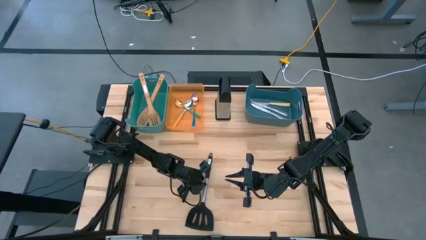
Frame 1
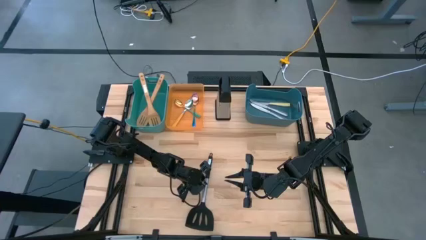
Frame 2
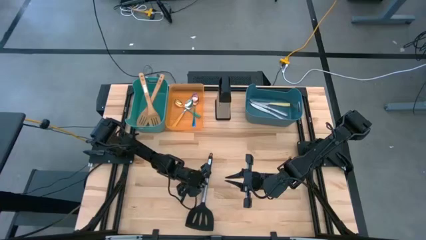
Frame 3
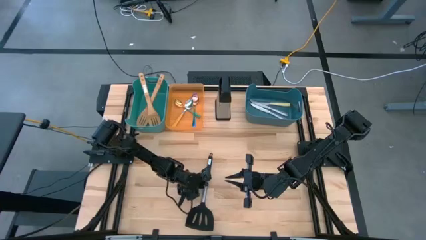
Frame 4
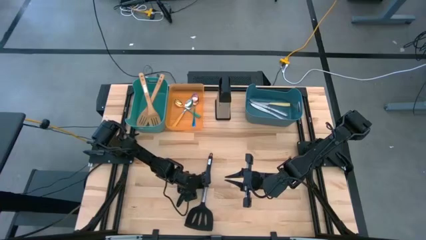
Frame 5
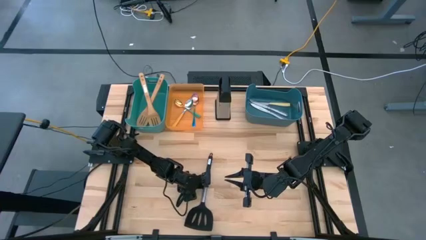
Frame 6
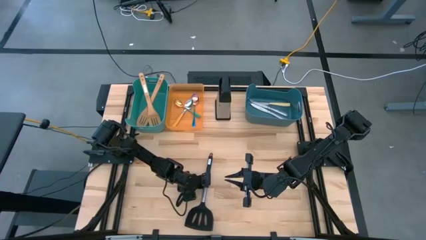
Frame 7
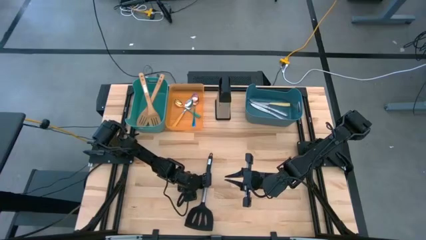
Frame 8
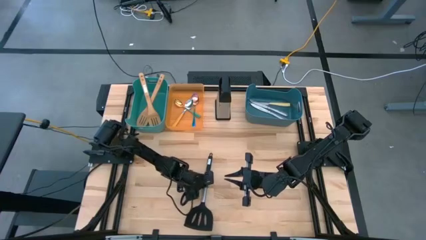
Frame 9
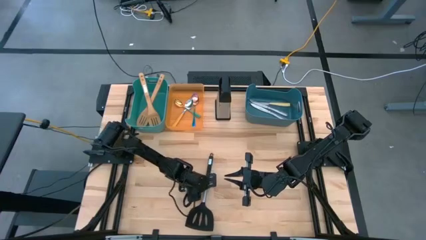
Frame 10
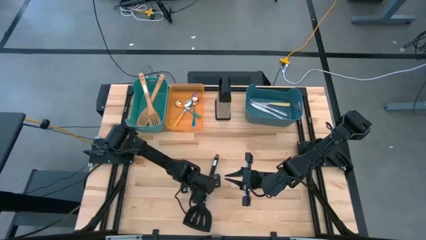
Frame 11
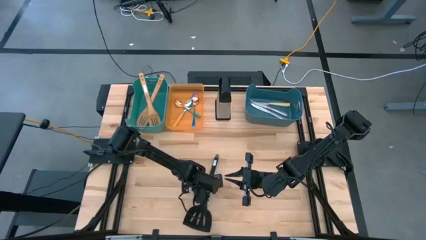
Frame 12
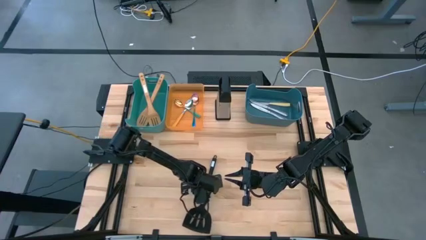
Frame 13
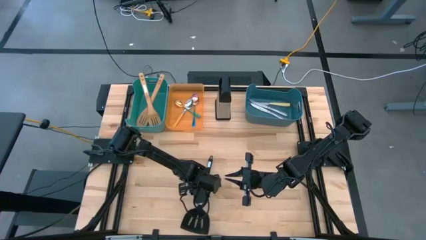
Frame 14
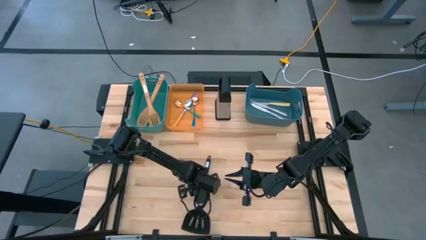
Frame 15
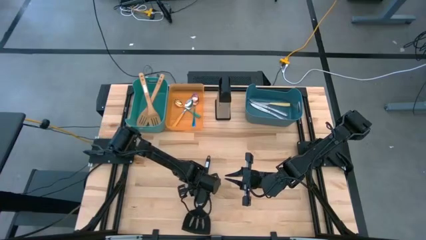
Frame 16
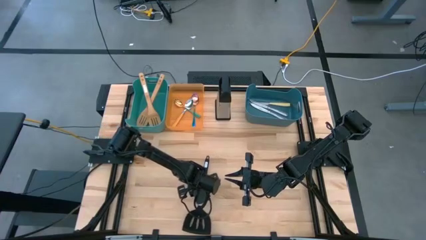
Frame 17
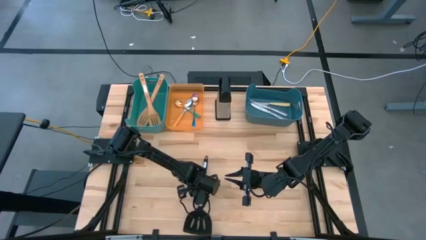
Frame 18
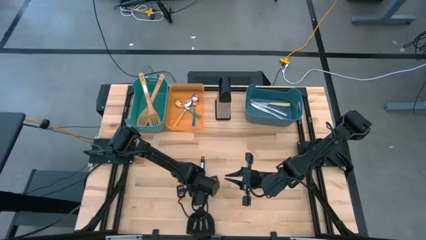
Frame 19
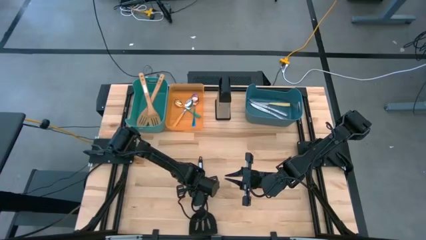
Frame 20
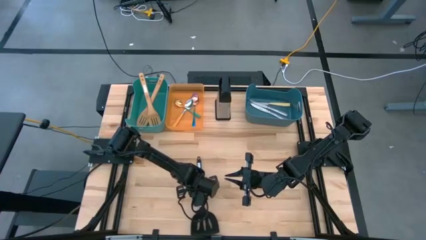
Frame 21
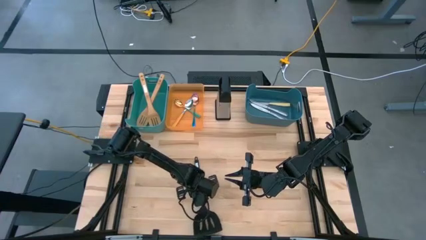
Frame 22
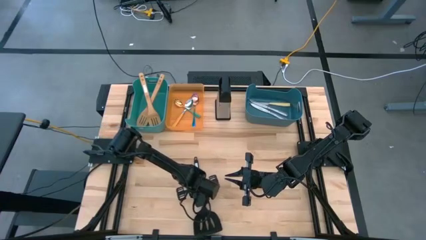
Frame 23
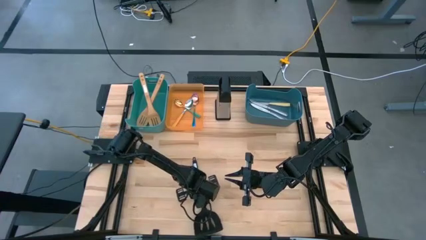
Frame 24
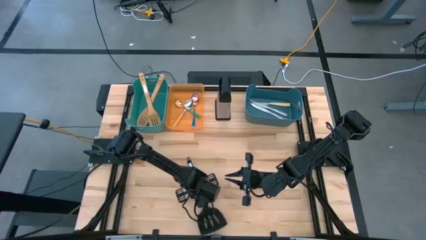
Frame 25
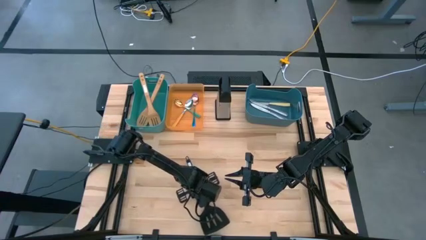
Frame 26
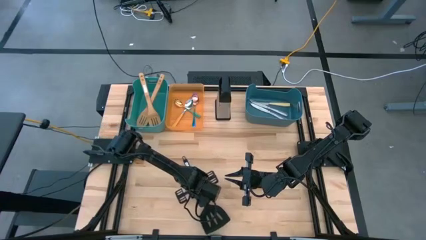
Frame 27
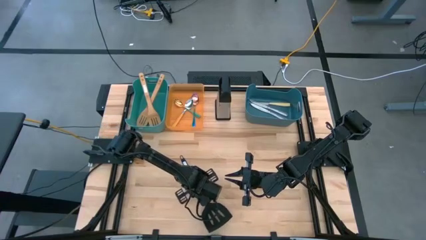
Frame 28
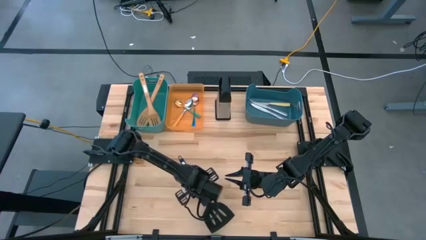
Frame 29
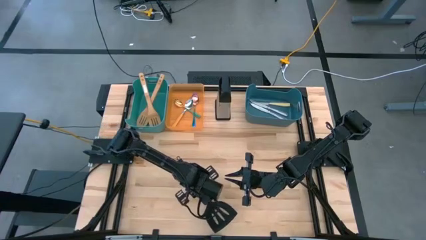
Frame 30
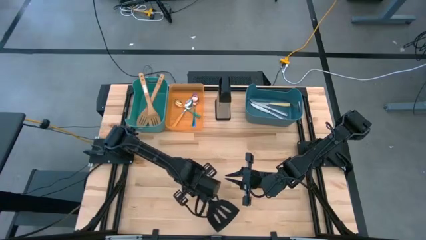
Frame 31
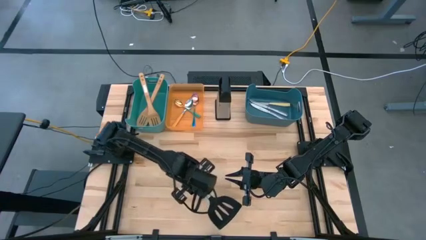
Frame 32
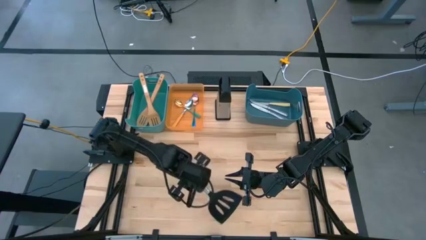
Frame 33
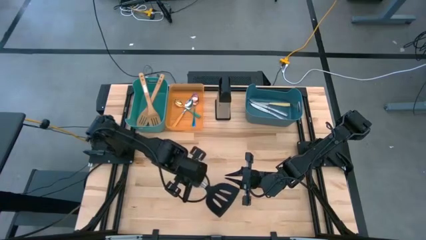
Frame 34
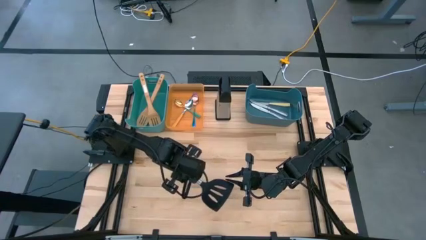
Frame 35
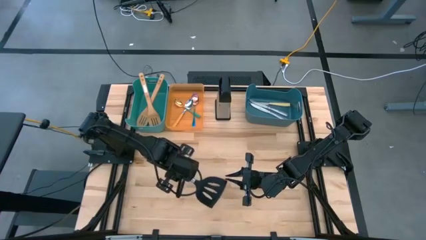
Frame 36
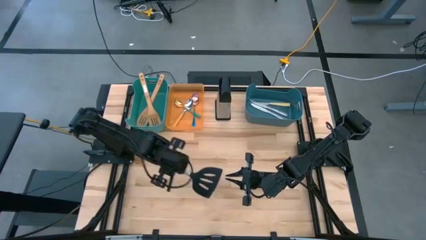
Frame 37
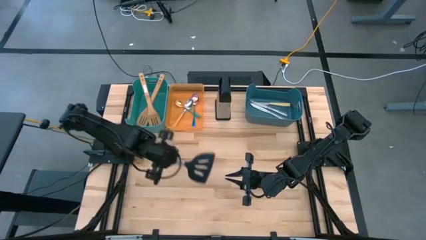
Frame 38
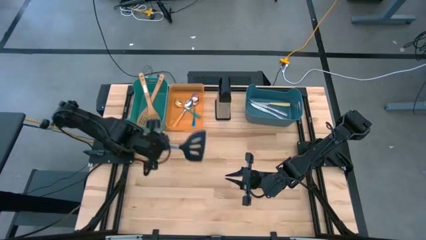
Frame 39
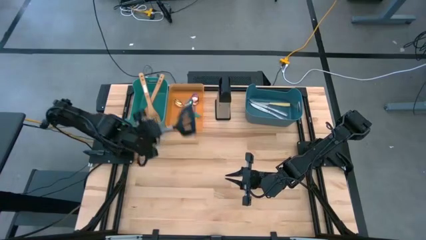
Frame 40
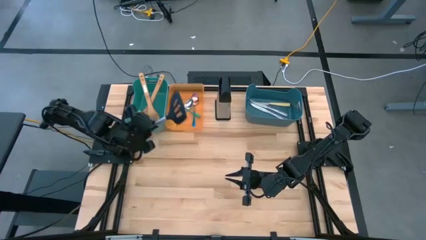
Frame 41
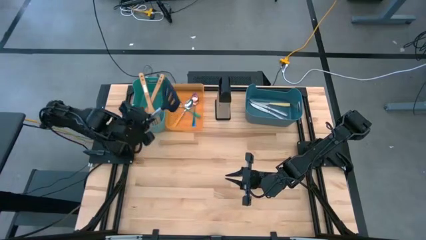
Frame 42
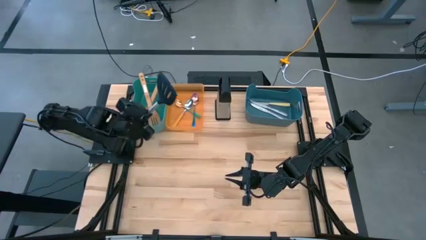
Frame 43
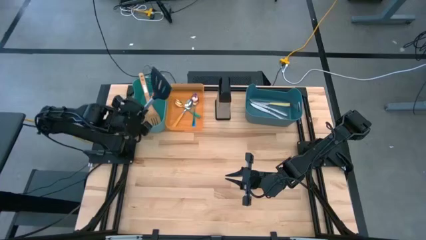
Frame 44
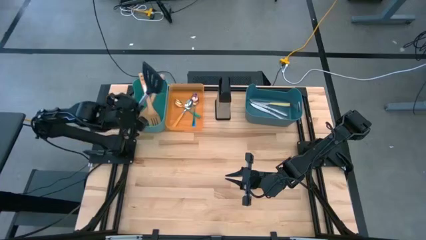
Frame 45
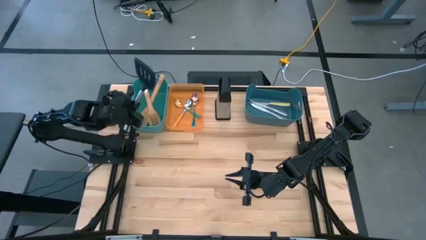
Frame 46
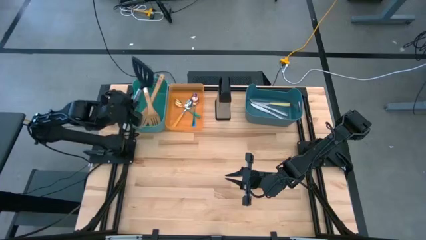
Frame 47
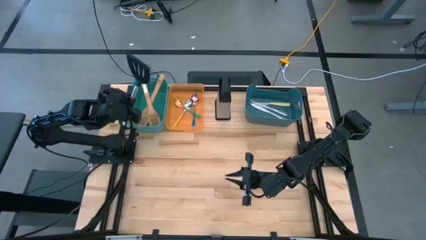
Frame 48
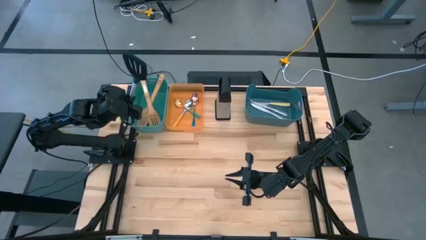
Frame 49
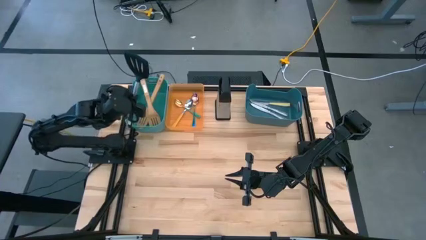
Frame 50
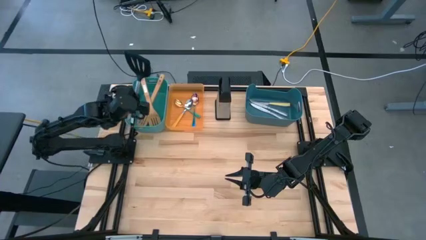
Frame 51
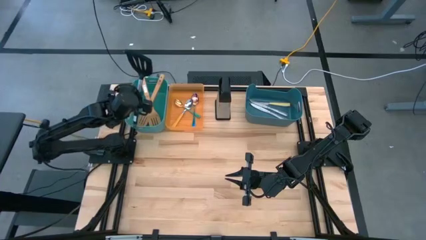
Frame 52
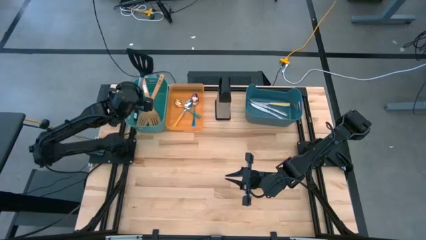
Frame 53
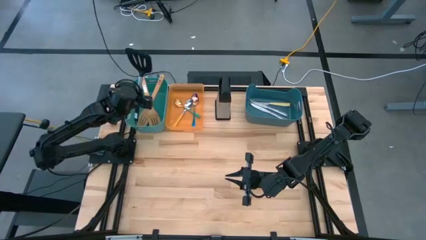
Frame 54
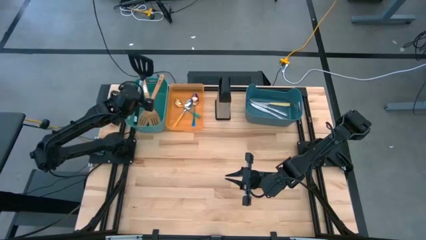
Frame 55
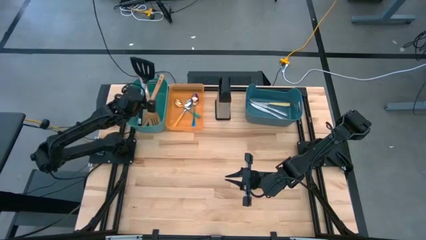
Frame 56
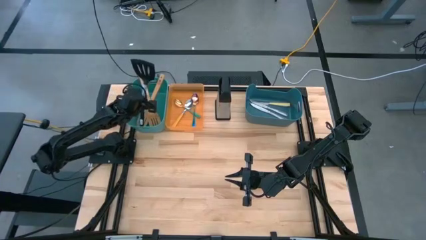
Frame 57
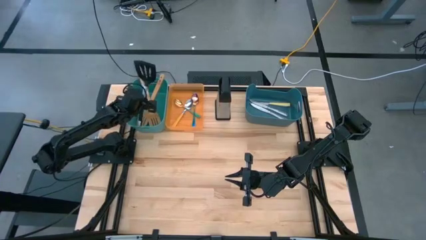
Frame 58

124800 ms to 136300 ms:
Task: Pick & Place Kitchen Items
Put the black spatula into the green bin

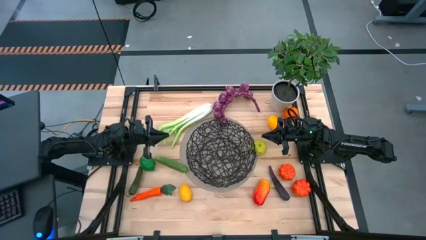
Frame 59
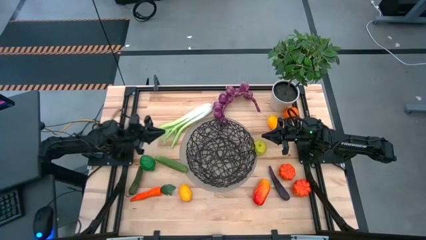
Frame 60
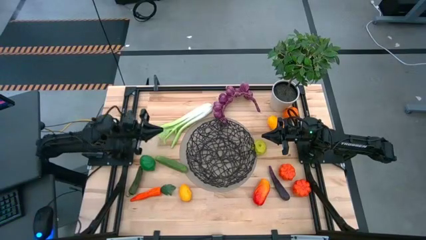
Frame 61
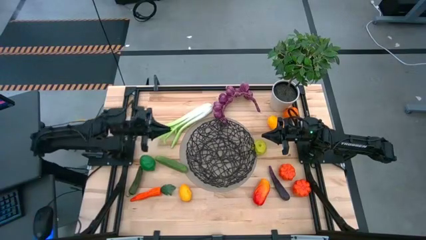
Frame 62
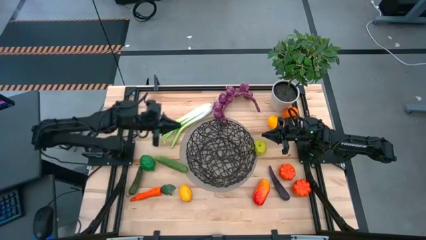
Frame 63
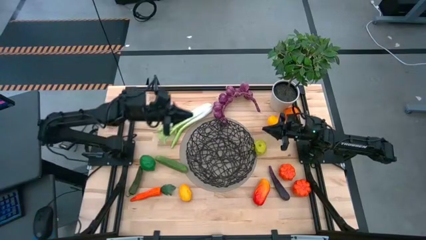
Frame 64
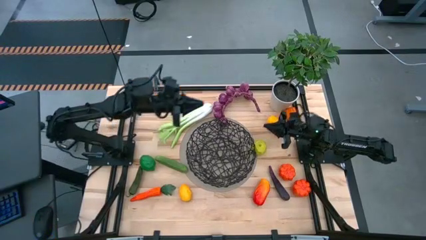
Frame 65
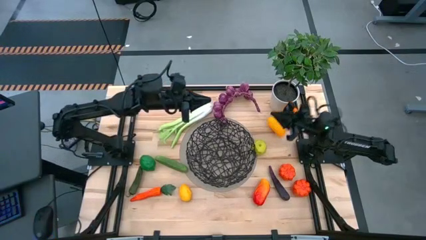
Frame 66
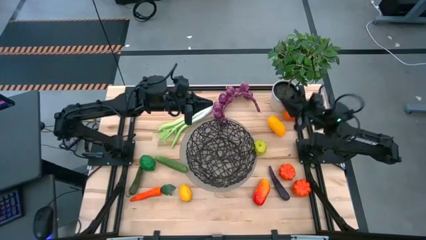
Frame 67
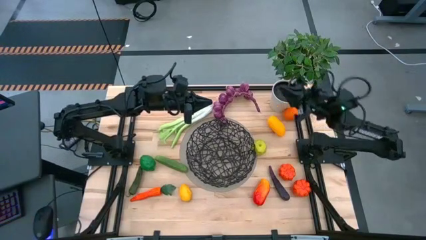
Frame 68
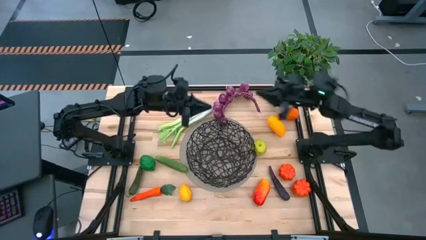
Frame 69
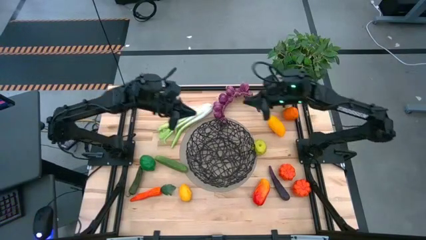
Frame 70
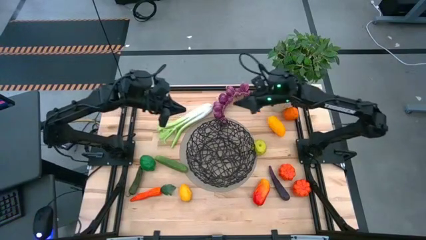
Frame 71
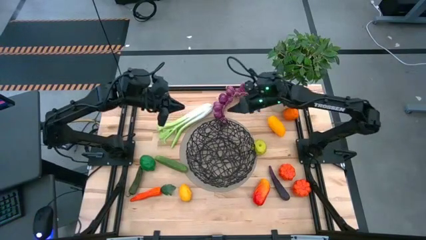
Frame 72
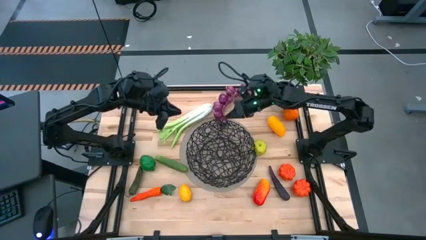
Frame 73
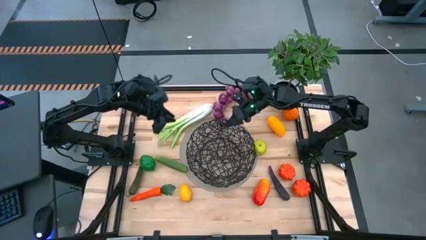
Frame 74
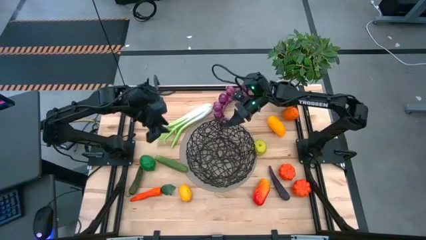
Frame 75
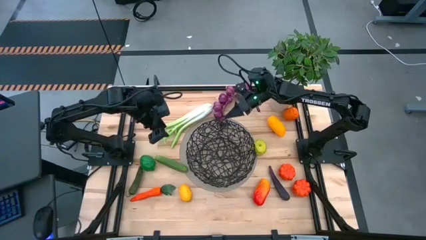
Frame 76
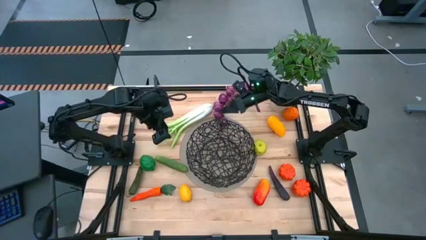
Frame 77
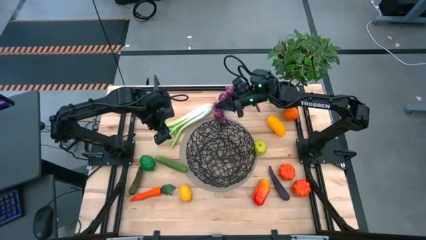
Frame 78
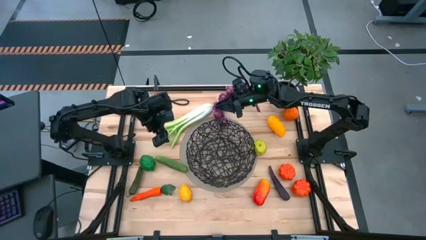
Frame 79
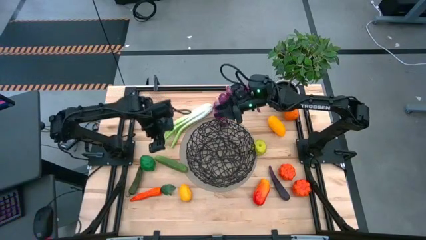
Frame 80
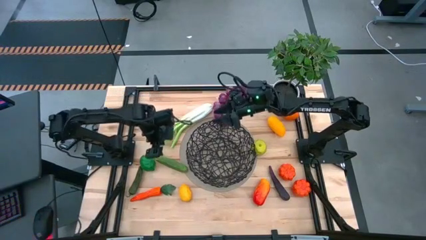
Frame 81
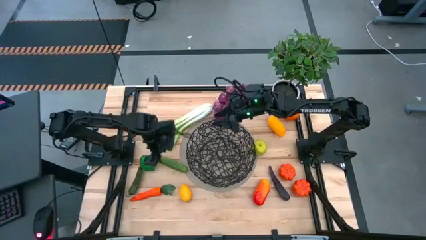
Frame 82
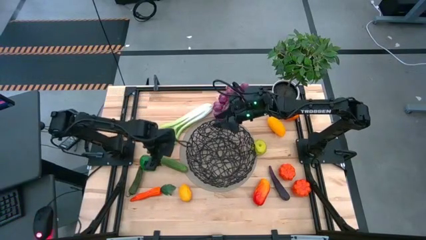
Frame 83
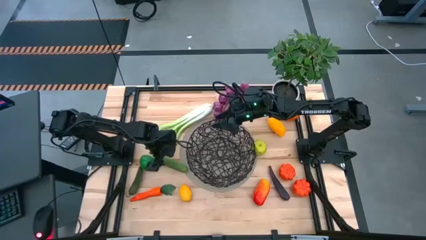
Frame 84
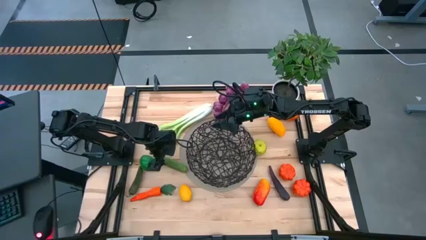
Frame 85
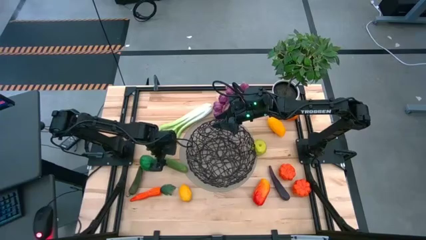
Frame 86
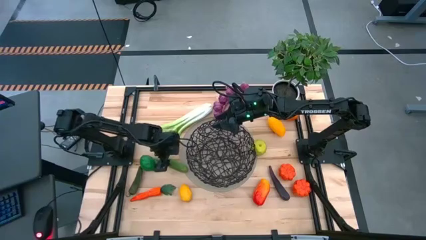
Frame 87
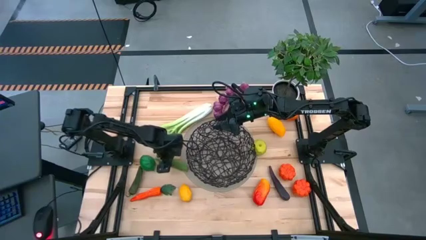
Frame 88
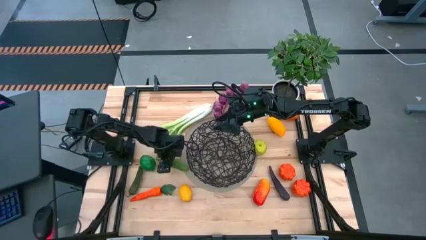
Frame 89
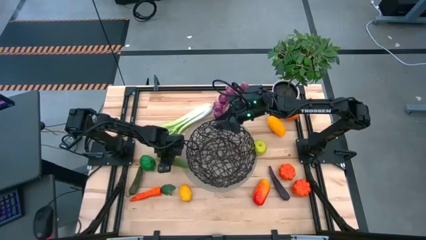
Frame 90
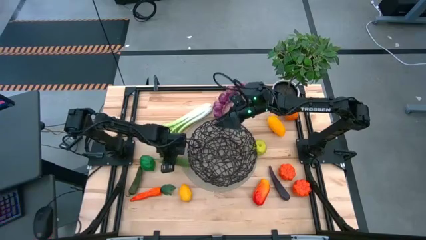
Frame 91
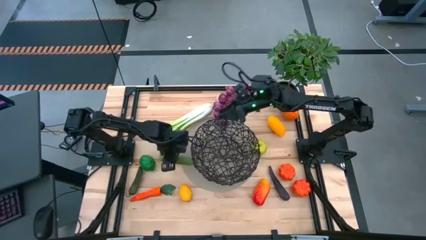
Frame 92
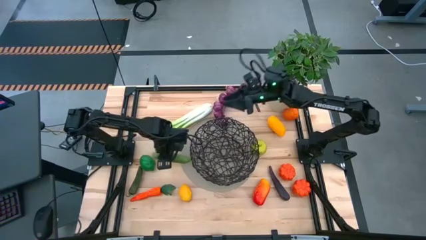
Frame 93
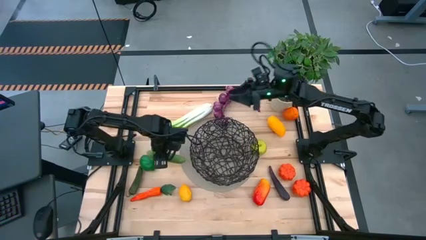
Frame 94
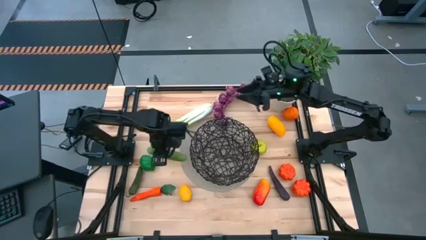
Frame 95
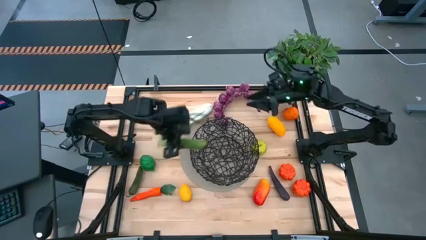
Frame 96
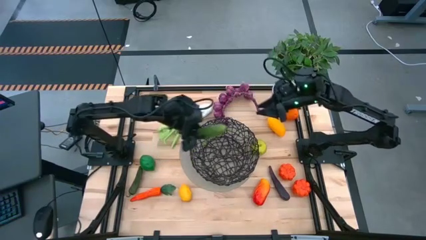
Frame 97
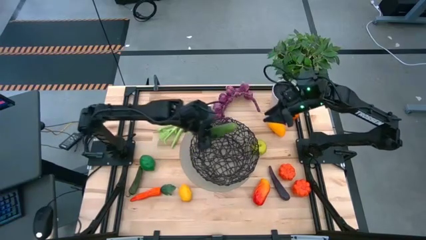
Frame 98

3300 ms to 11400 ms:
Task: Build produce basket
Put the green cucumber into the black wire basket
